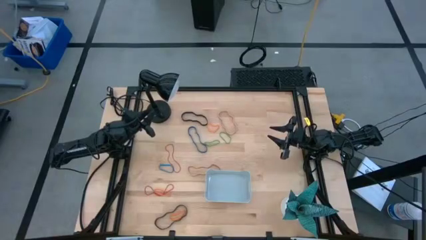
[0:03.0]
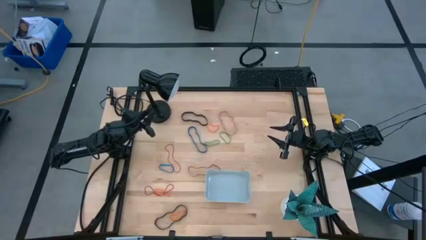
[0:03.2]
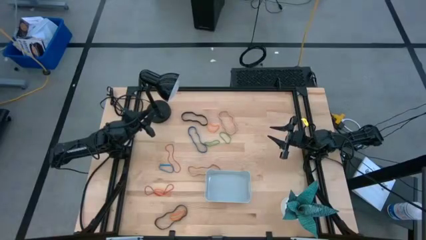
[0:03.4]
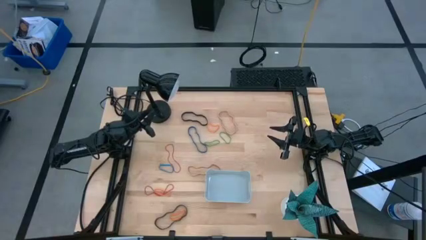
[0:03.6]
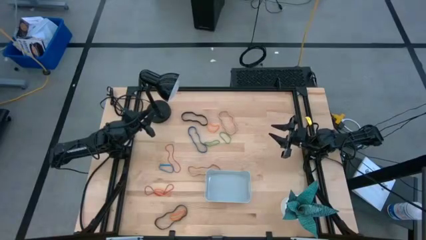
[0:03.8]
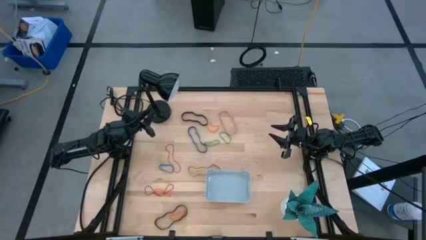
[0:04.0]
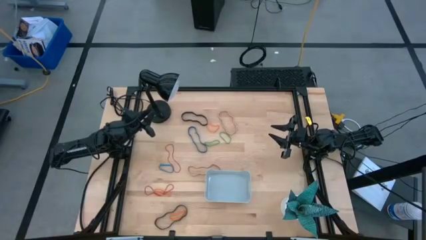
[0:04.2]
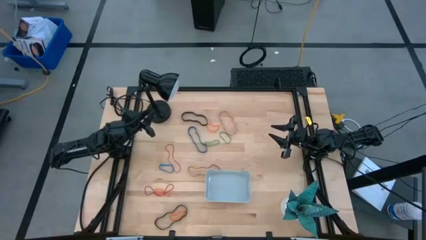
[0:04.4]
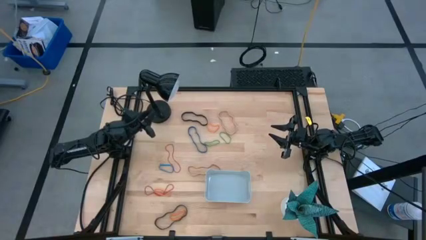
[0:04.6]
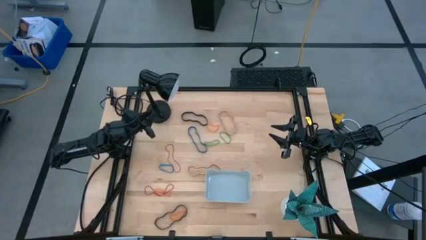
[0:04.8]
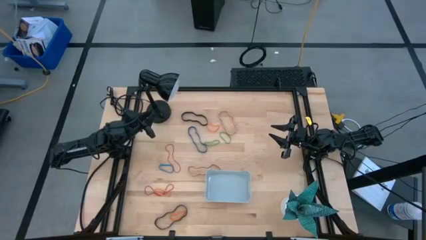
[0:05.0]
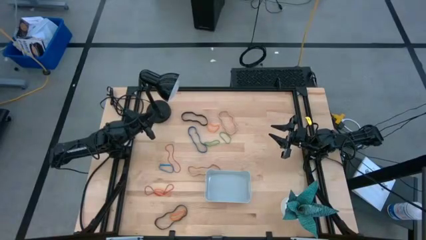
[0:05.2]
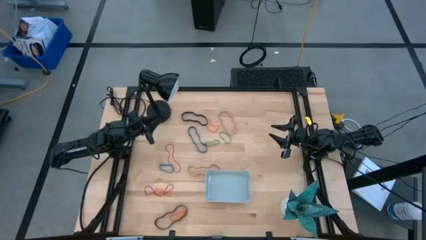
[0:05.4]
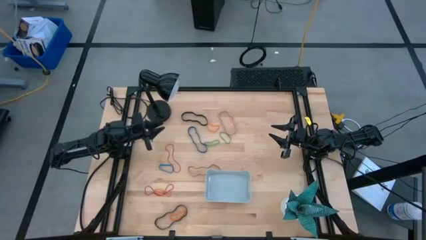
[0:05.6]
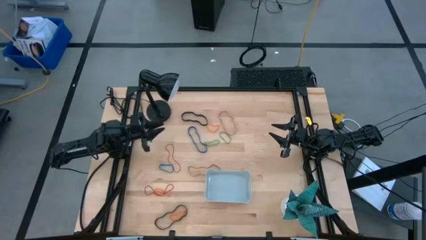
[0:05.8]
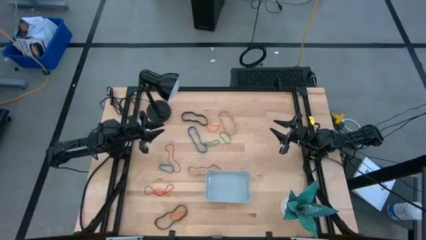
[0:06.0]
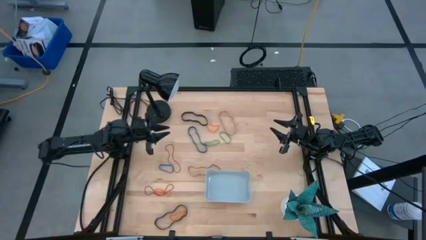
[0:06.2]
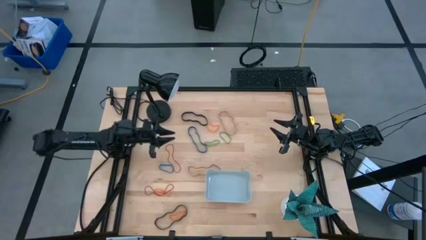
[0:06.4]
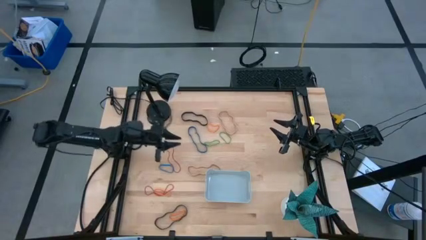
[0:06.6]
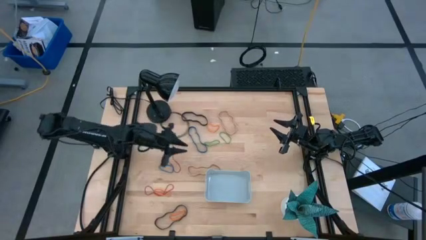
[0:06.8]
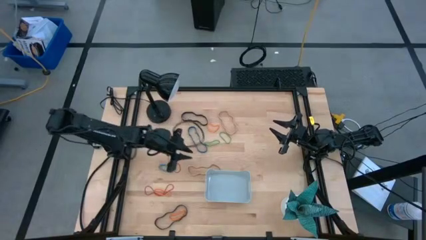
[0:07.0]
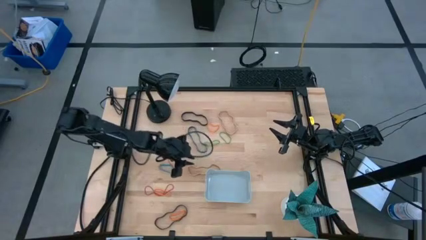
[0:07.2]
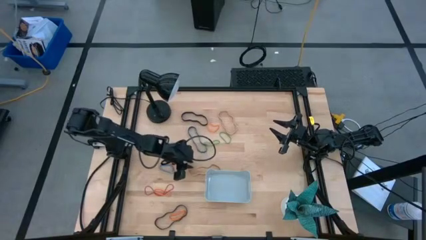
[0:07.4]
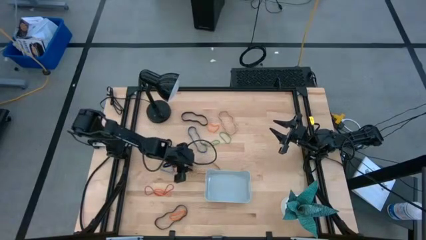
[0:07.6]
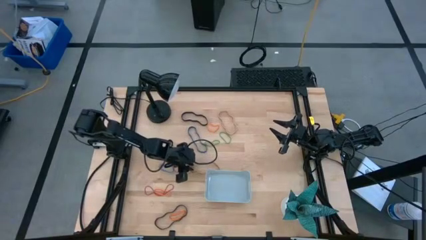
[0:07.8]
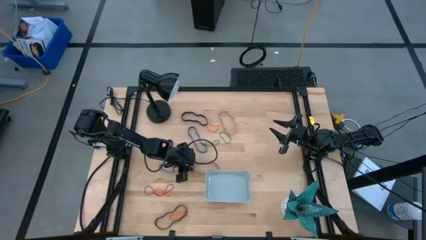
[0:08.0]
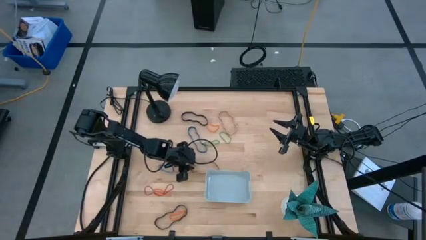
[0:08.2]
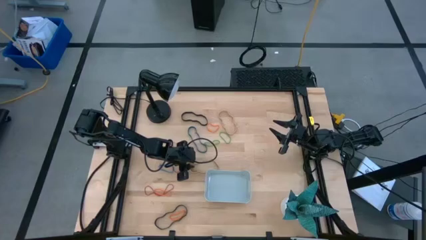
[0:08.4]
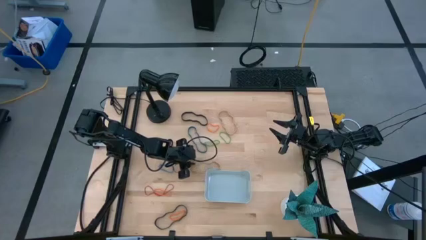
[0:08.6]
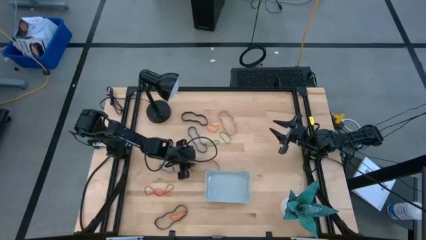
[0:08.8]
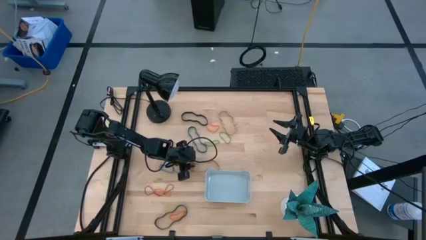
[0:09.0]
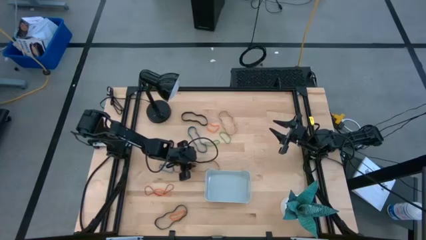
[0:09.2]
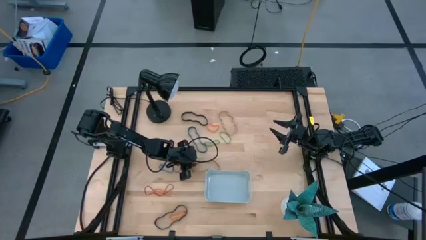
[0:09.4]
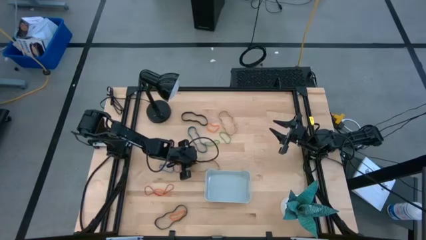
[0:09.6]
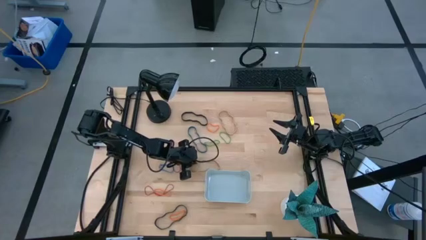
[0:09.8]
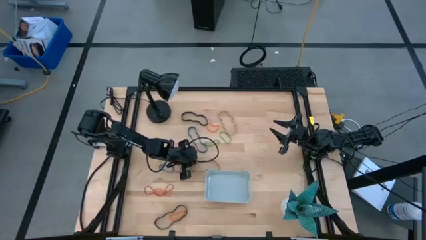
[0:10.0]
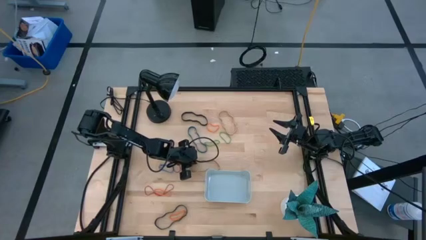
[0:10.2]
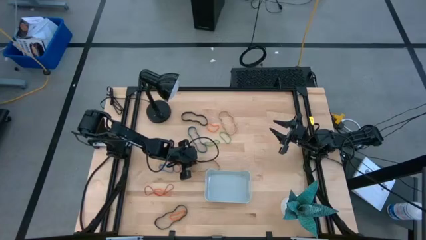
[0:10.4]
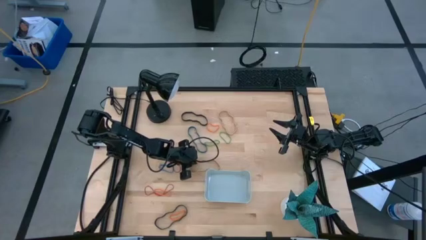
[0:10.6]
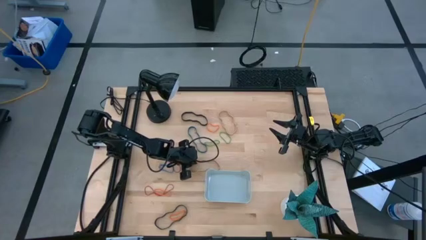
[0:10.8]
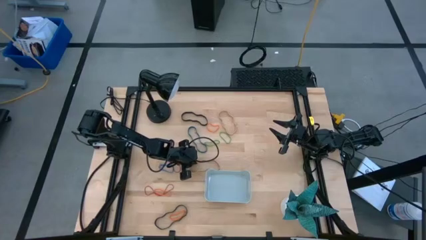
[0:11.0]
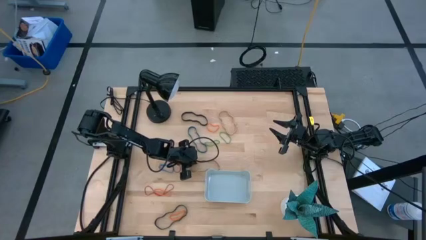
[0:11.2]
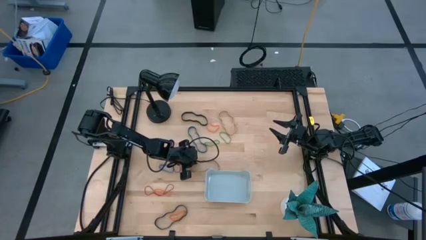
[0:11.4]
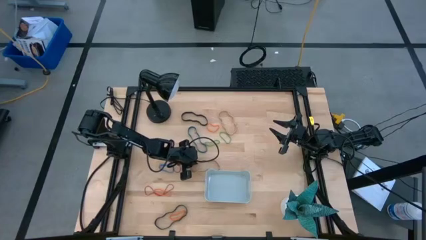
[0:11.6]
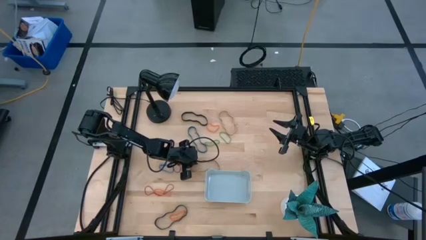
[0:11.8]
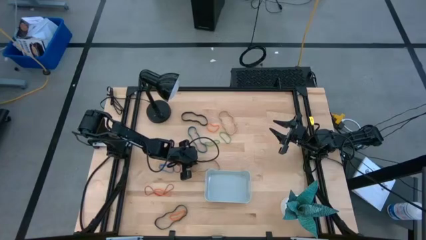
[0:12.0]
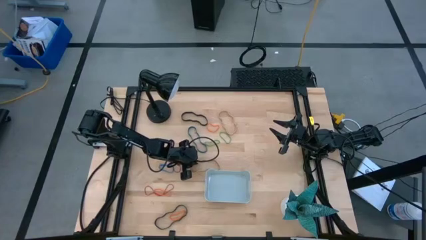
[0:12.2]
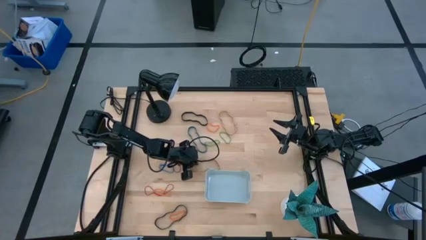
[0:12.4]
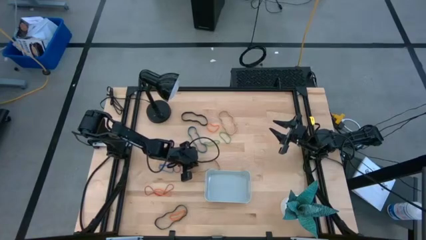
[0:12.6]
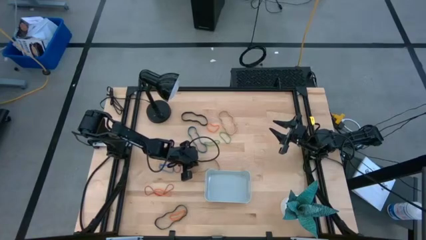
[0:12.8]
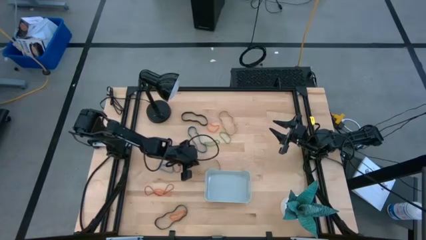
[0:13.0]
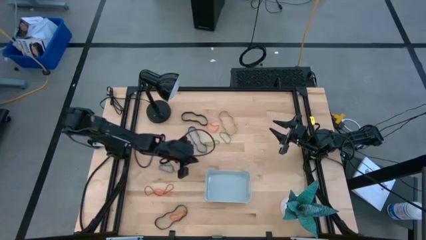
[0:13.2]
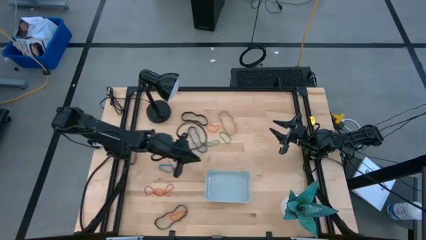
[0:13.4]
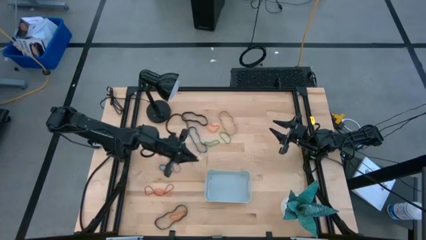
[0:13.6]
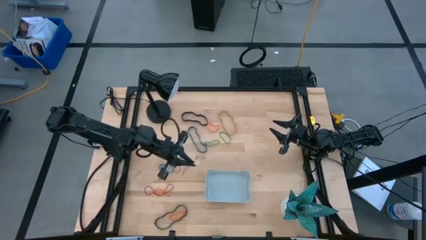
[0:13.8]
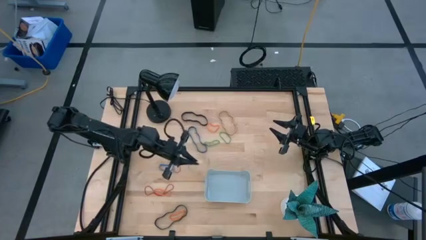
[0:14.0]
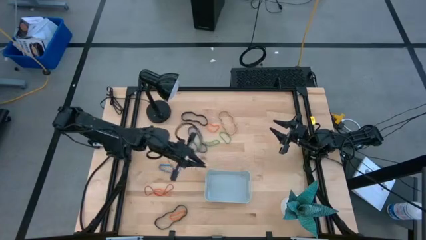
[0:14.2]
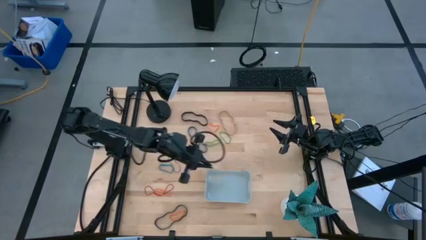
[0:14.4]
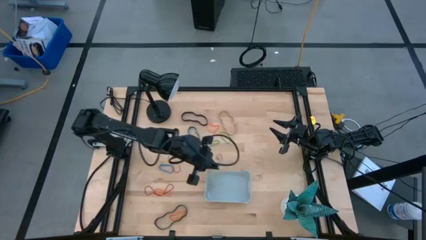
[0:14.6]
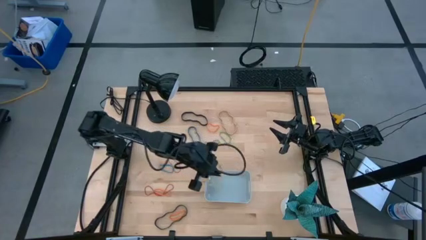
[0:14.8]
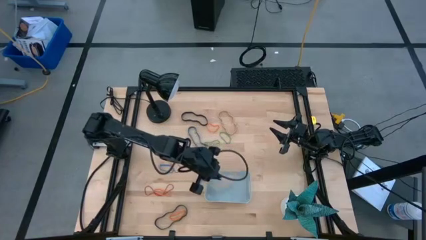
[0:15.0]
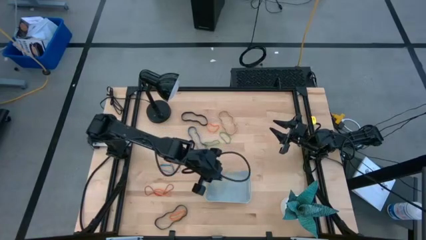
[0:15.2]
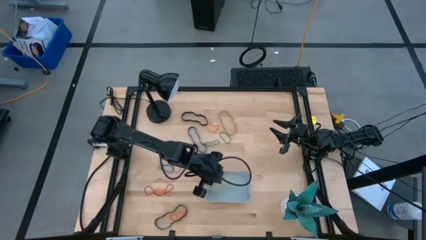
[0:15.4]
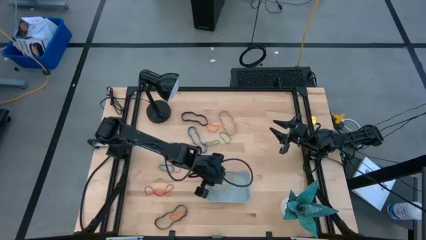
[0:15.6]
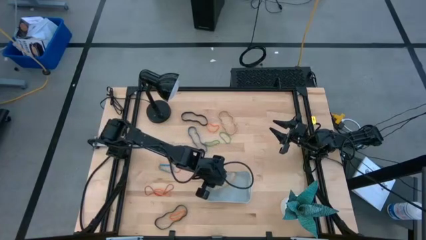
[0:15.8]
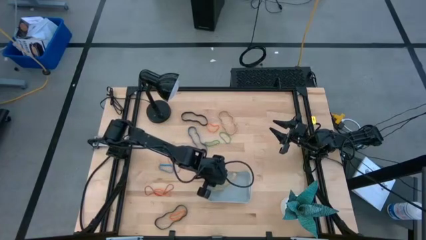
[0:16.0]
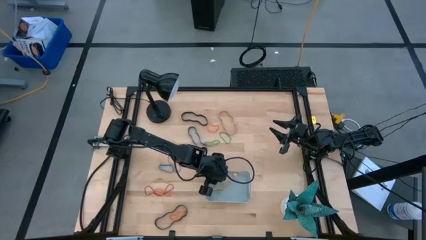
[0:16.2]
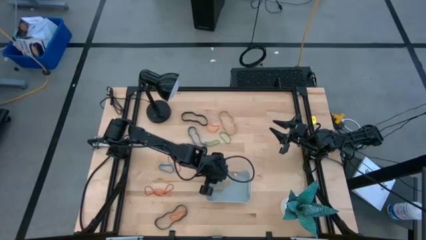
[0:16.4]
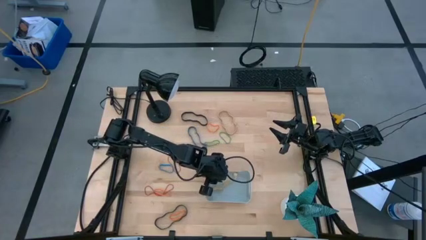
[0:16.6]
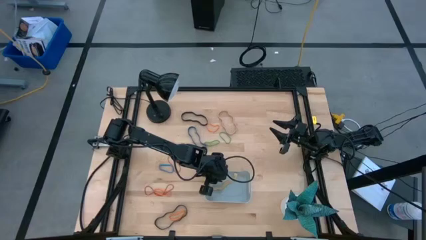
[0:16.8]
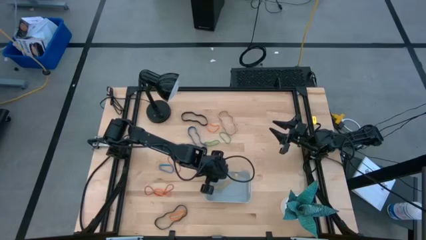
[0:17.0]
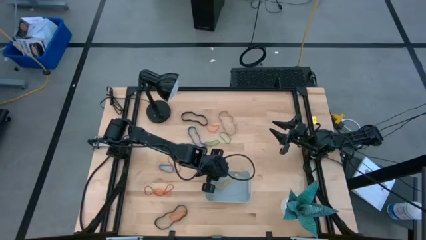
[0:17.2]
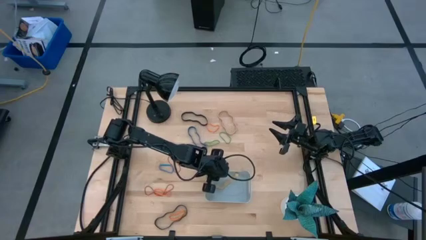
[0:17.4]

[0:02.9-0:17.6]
Task: Pick and place rubber bands into bin
Put the bottom brown rubber band into the gray bin
